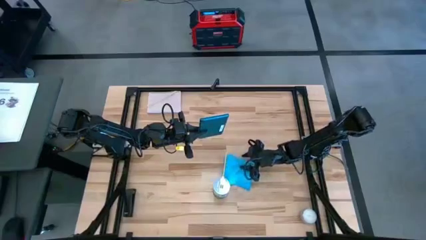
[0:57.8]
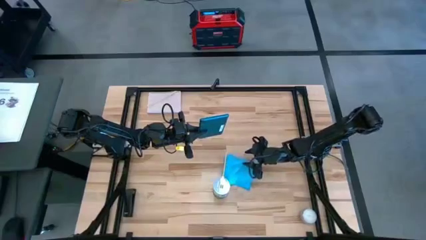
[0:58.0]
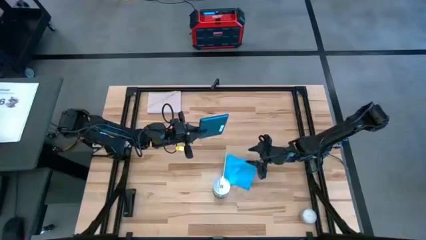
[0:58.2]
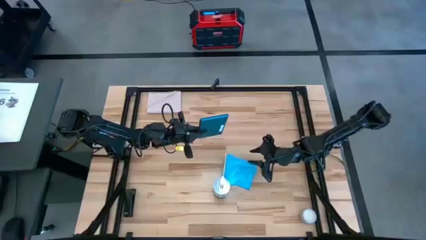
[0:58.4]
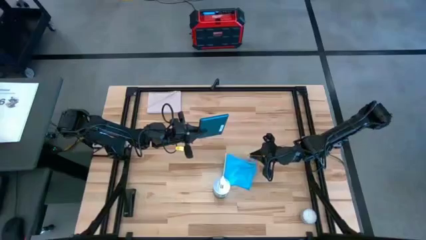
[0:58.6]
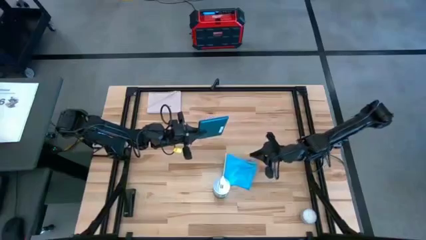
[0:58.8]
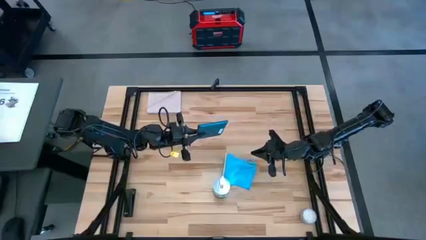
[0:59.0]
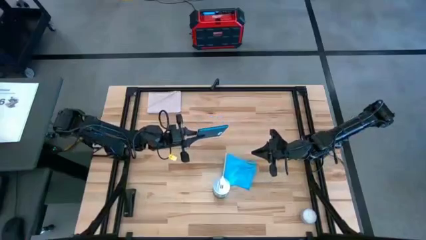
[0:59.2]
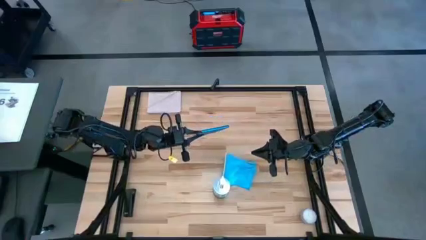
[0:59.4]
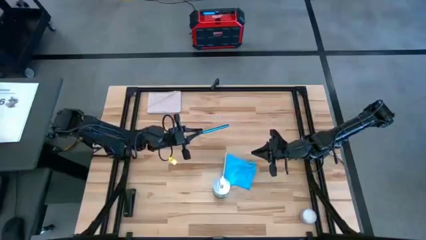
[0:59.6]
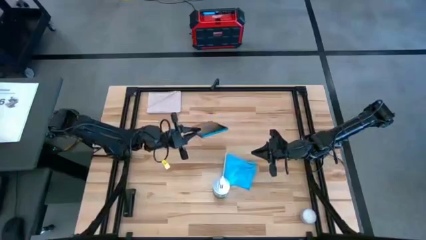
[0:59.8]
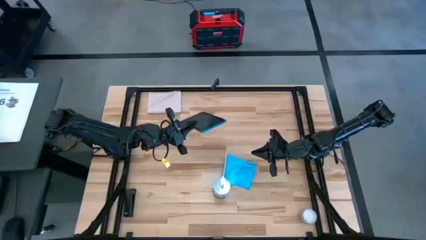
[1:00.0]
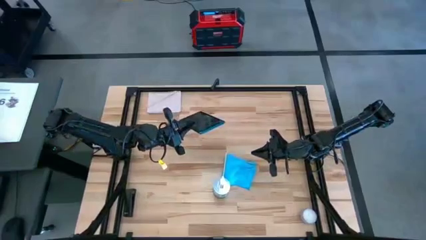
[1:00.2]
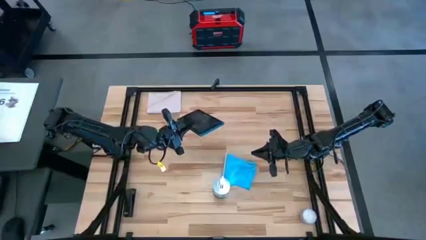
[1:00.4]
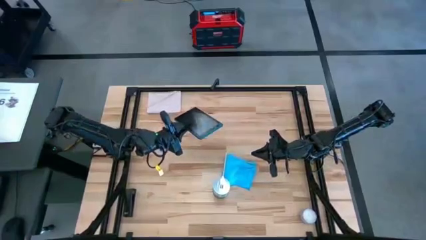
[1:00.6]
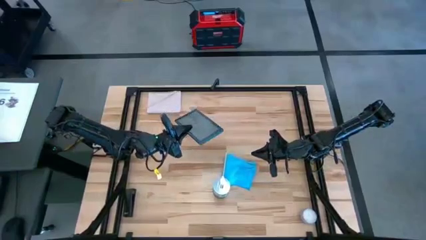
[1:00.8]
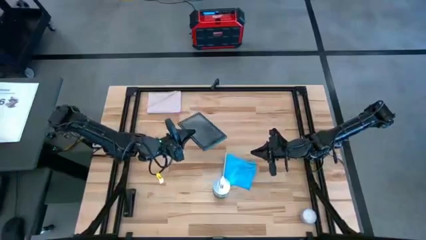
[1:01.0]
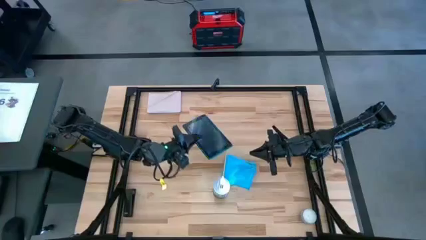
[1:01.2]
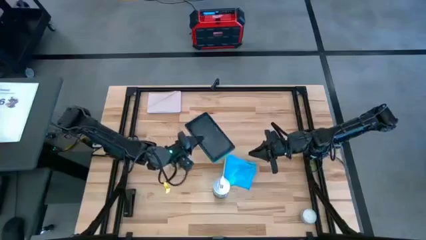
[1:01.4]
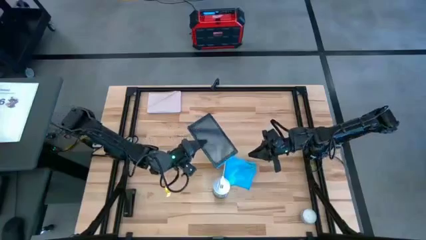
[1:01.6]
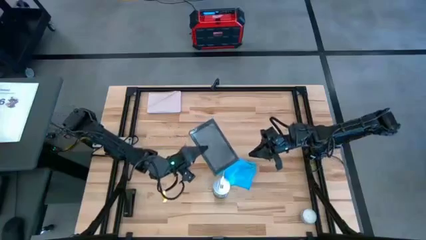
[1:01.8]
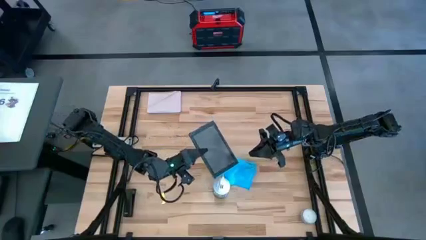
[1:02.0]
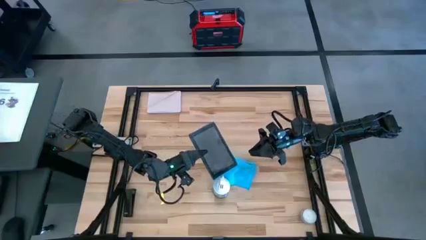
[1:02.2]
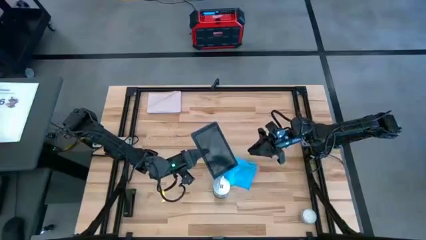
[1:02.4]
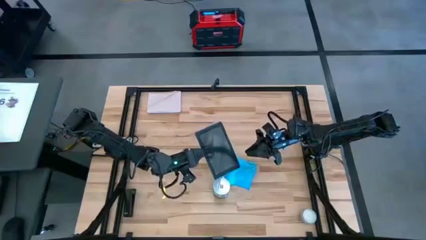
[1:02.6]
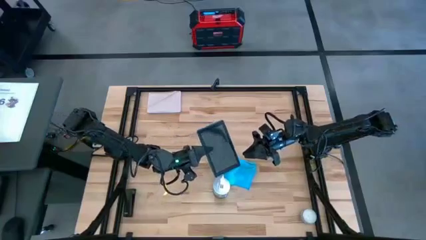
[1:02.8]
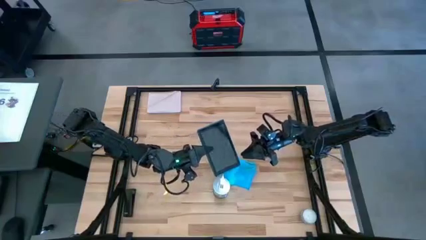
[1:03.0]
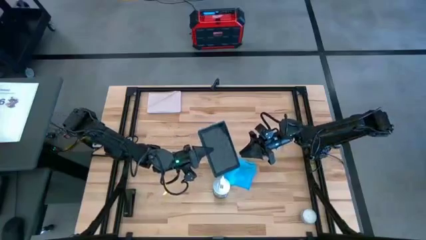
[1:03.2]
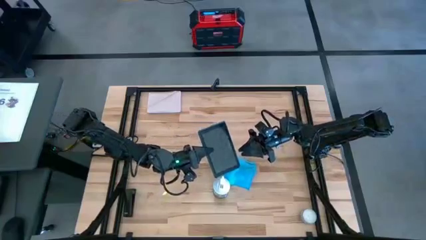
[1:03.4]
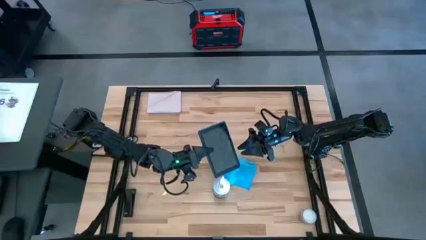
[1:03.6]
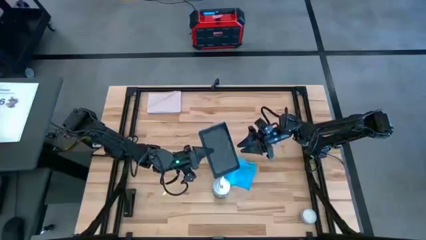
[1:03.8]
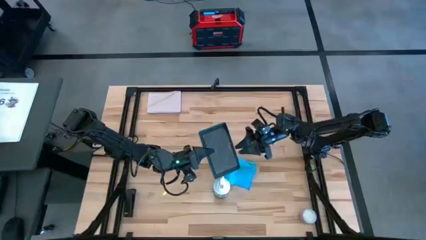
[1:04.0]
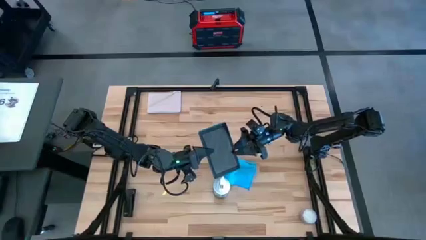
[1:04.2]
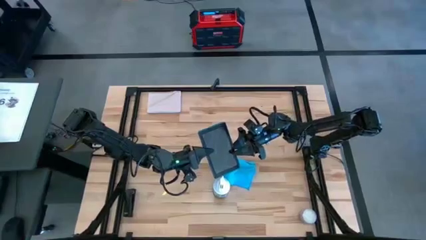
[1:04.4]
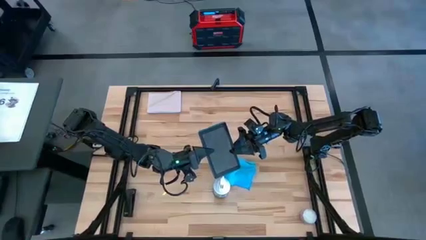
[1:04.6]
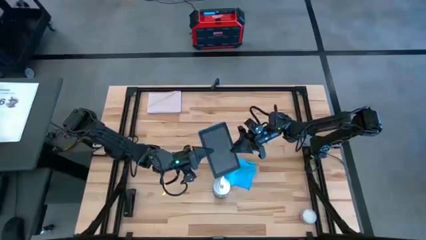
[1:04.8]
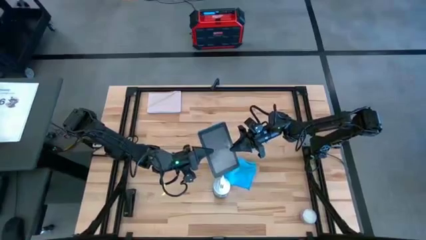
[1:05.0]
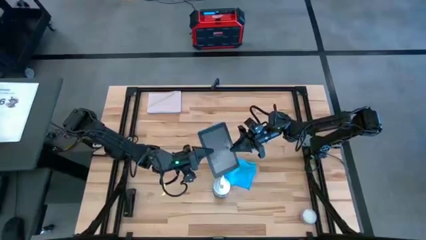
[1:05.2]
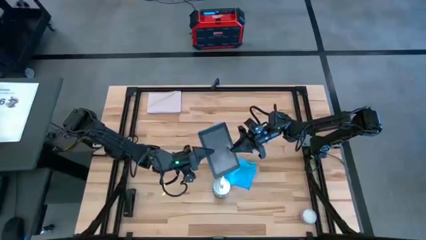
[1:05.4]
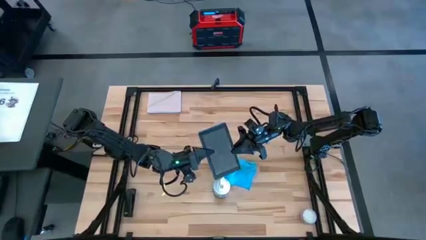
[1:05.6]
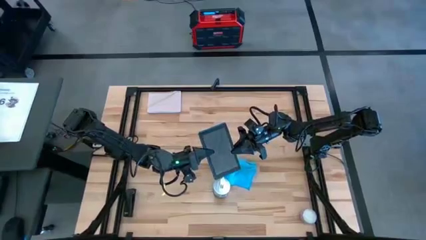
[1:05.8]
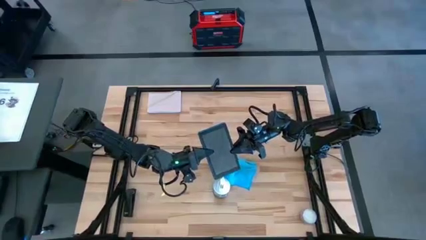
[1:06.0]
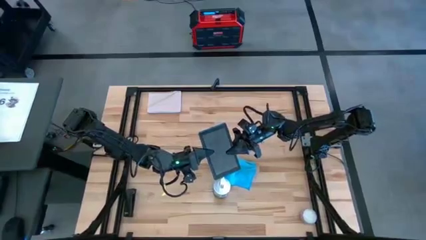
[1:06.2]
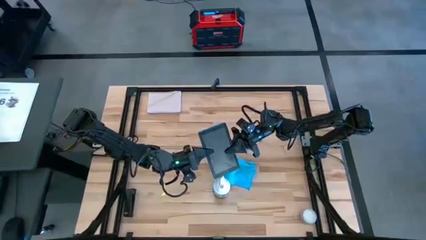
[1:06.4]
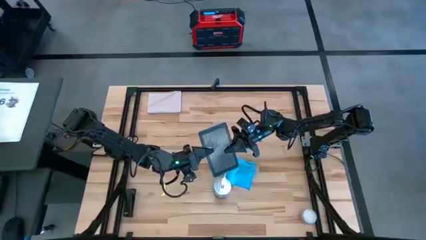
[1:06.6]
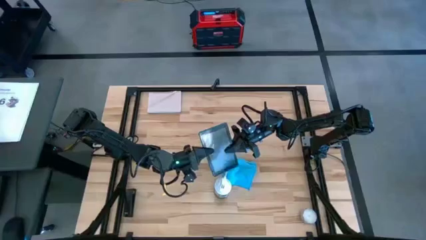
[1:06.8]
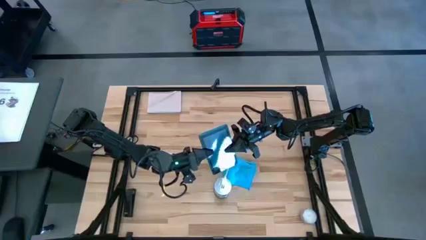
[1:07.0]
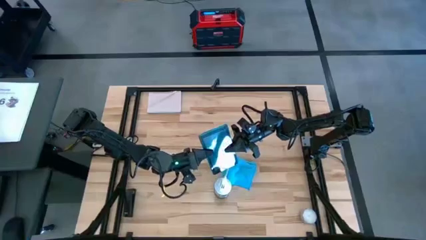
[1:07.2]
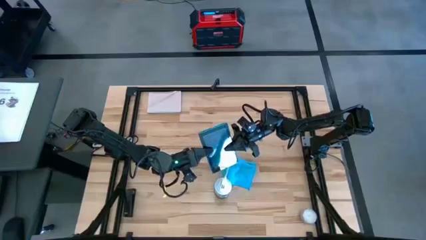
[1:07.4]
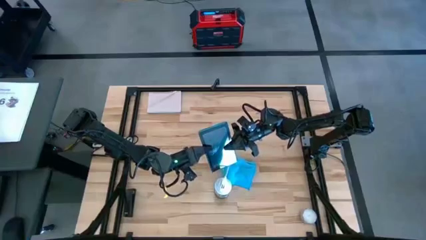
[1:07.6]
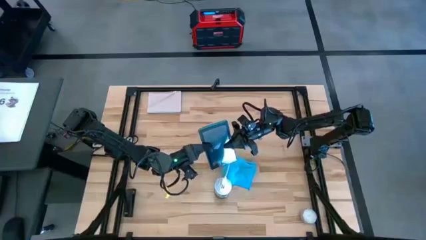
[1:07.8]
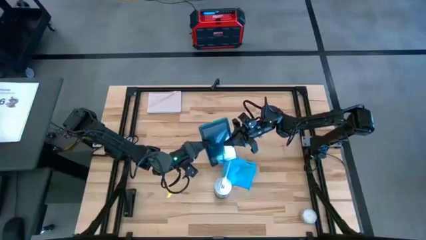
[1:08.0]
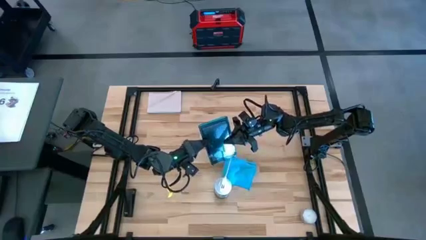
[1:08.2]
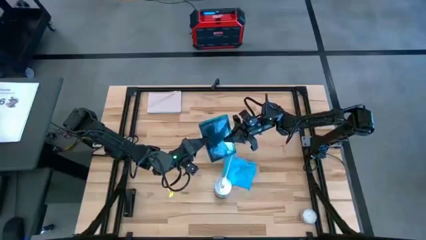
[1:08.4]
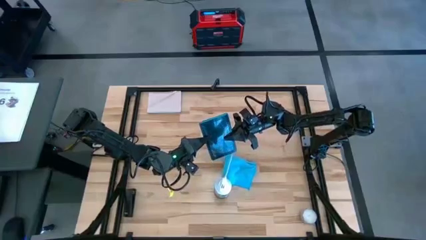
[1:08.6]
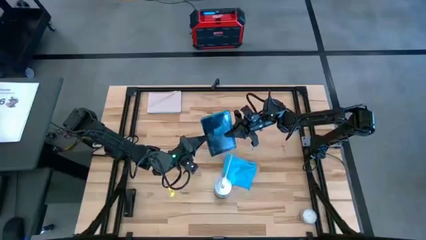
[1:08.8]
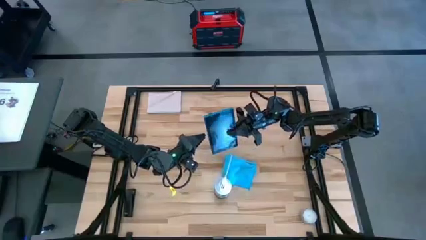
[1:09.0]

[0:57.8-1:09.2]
Task: Apply microfiber cloth
Spray the front of the green tablet using the white spray bottle
